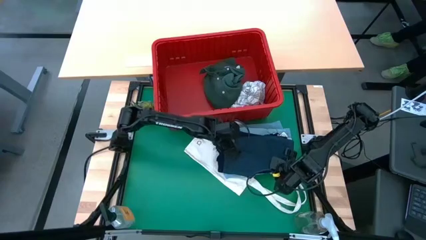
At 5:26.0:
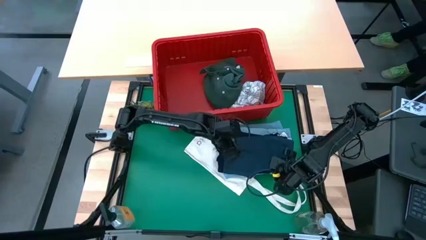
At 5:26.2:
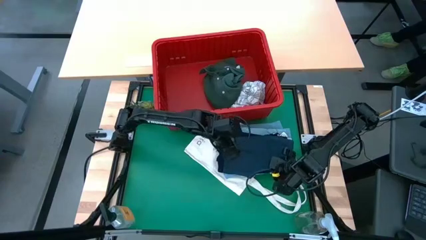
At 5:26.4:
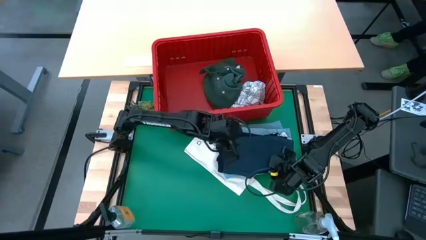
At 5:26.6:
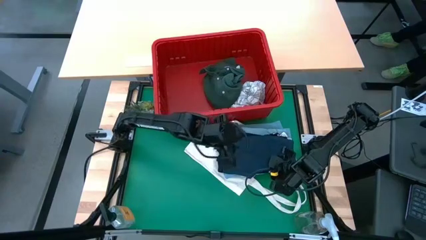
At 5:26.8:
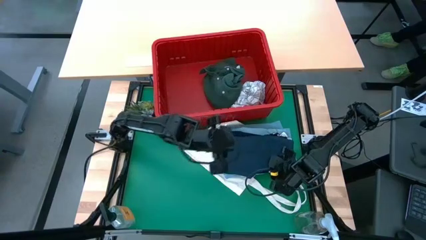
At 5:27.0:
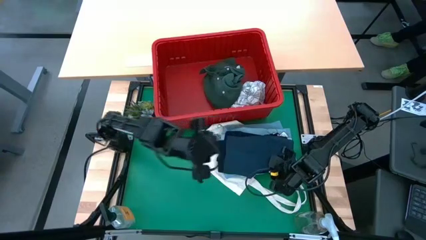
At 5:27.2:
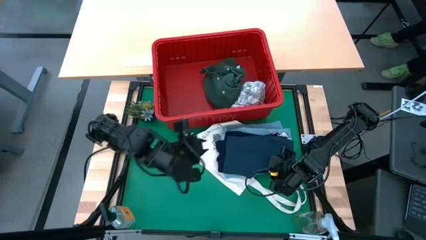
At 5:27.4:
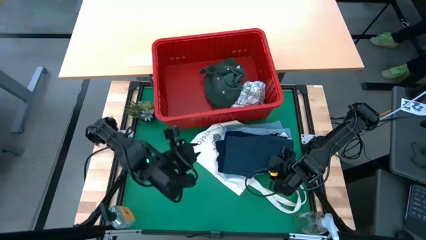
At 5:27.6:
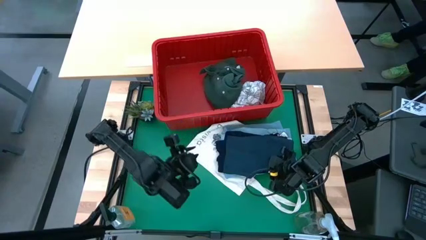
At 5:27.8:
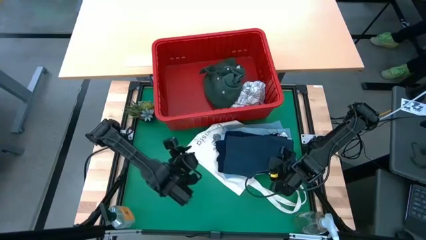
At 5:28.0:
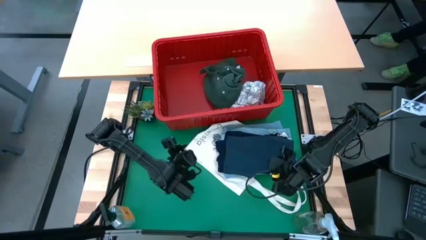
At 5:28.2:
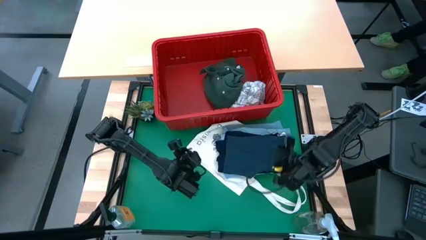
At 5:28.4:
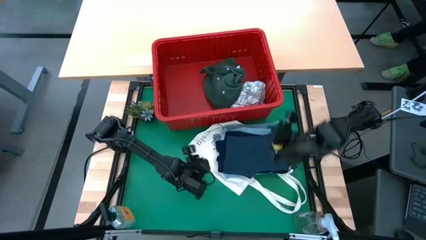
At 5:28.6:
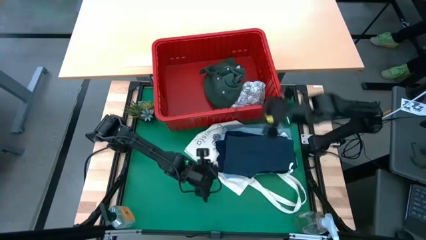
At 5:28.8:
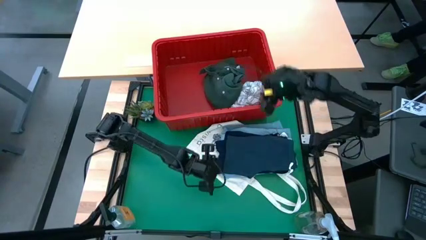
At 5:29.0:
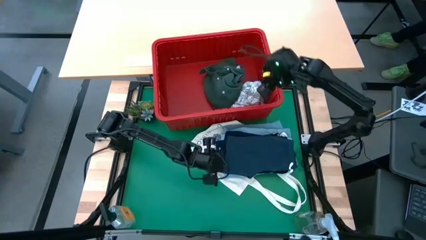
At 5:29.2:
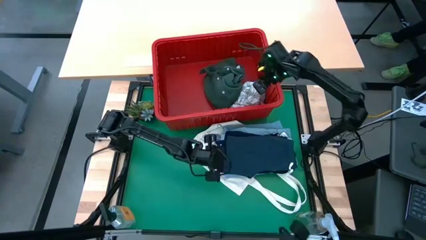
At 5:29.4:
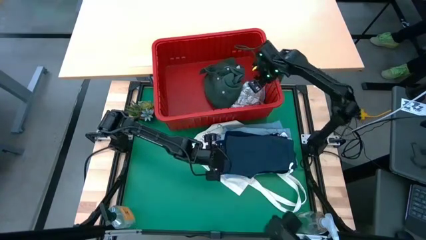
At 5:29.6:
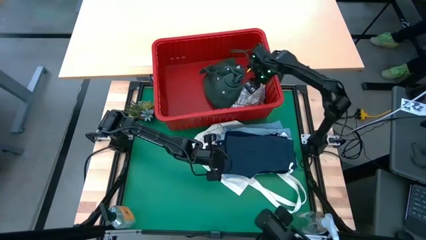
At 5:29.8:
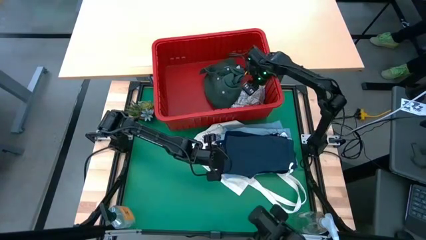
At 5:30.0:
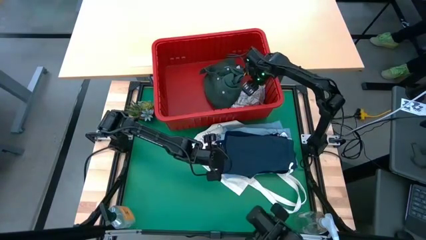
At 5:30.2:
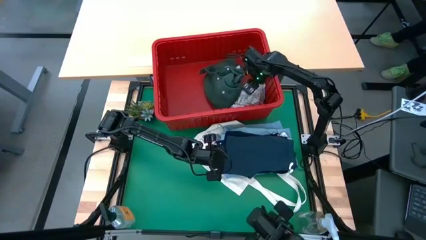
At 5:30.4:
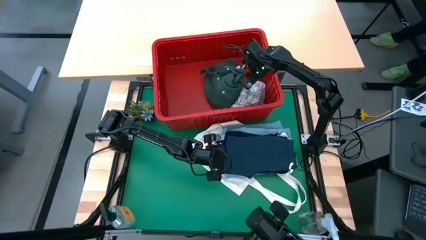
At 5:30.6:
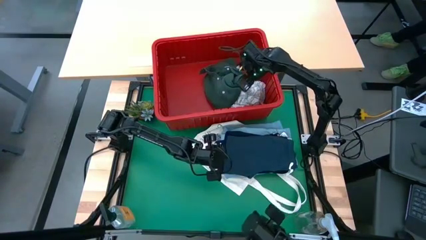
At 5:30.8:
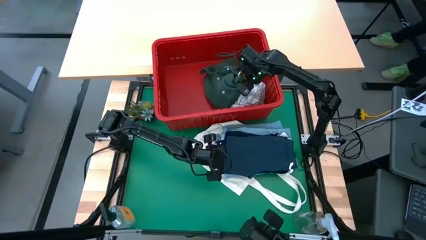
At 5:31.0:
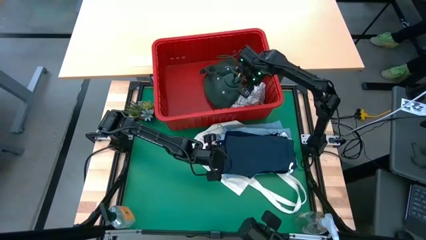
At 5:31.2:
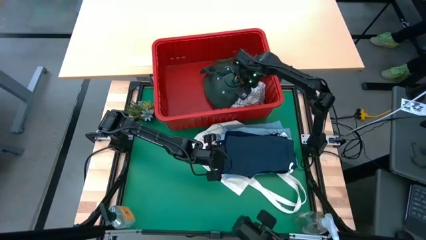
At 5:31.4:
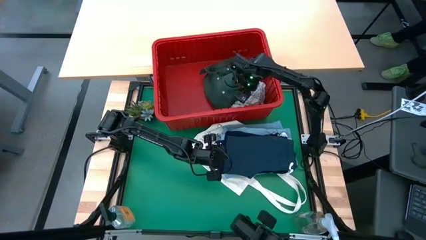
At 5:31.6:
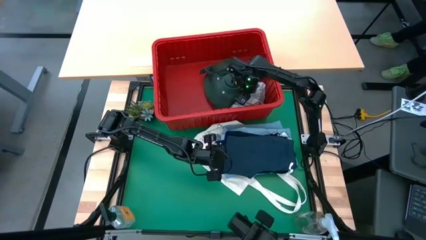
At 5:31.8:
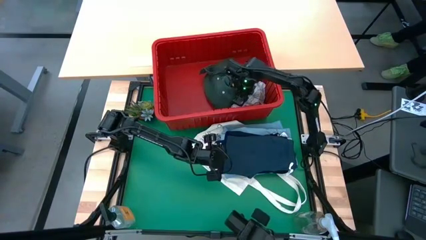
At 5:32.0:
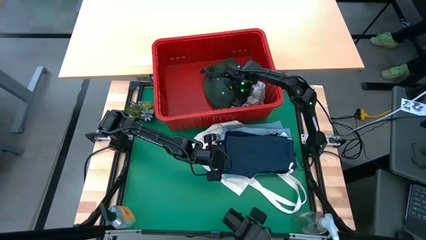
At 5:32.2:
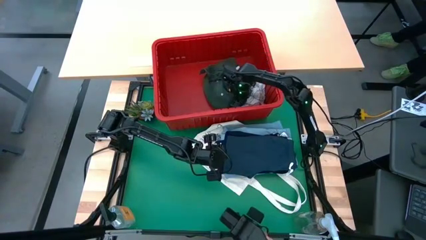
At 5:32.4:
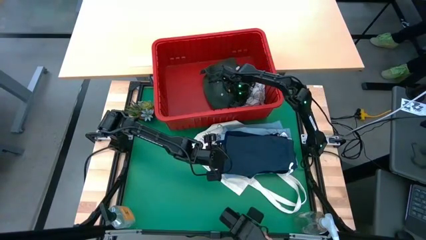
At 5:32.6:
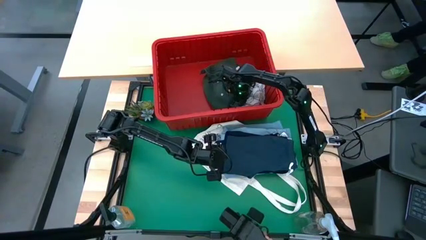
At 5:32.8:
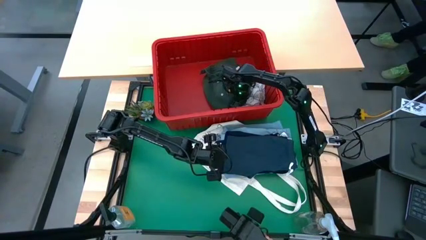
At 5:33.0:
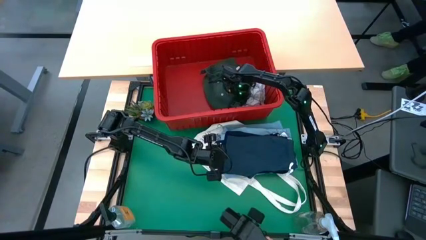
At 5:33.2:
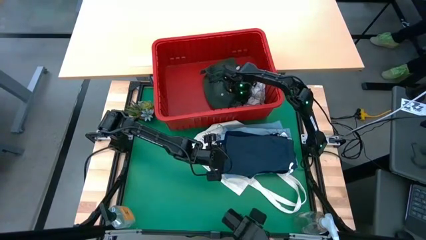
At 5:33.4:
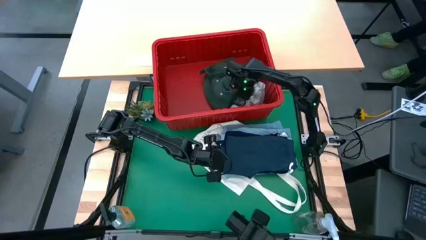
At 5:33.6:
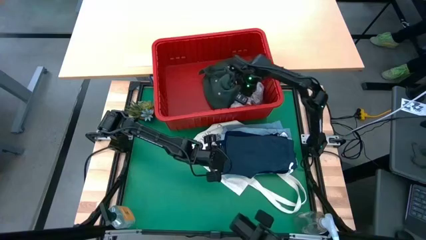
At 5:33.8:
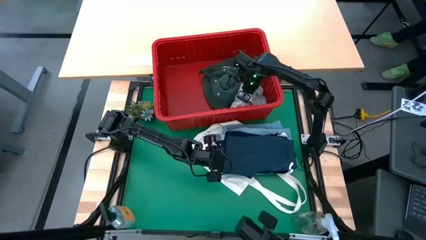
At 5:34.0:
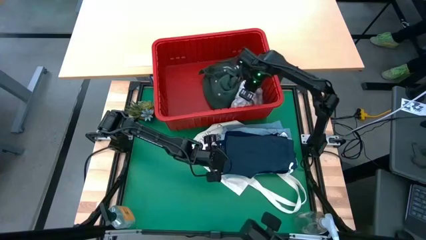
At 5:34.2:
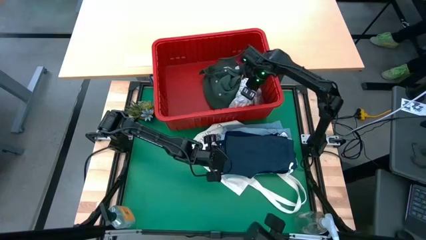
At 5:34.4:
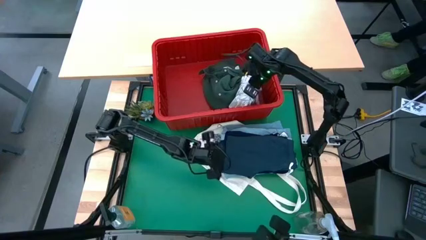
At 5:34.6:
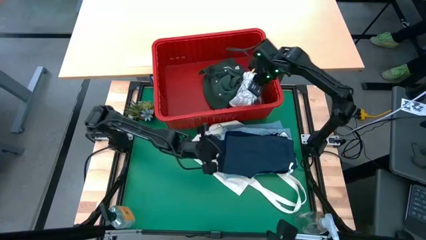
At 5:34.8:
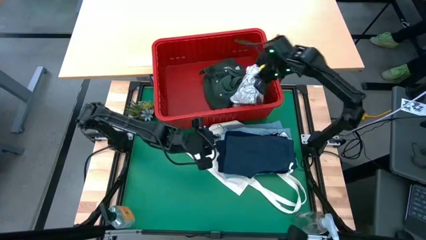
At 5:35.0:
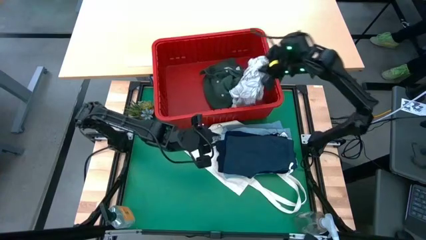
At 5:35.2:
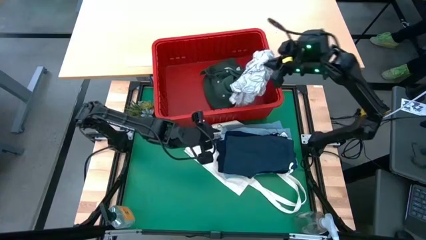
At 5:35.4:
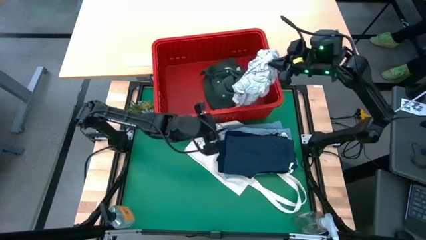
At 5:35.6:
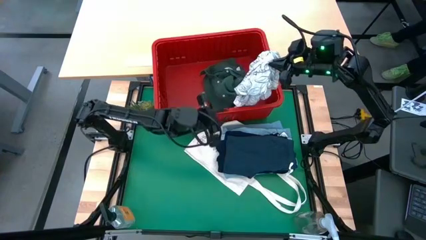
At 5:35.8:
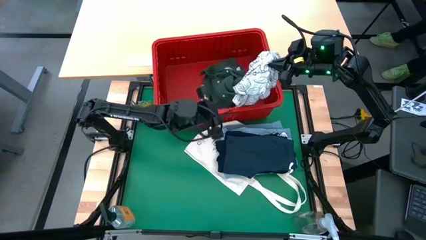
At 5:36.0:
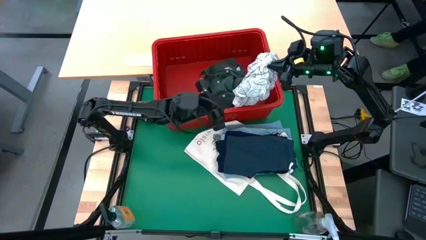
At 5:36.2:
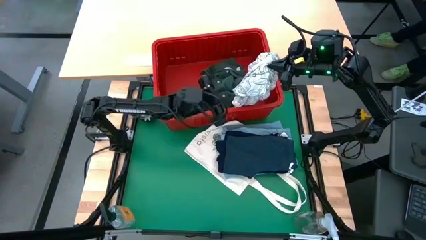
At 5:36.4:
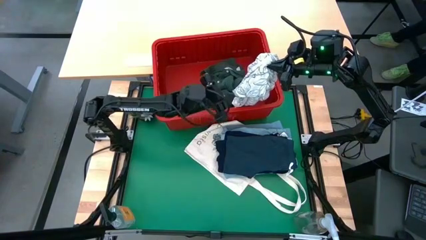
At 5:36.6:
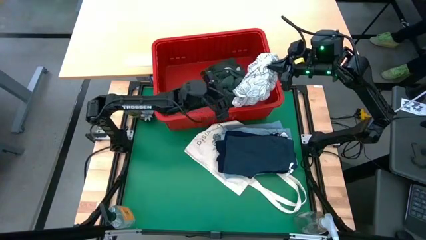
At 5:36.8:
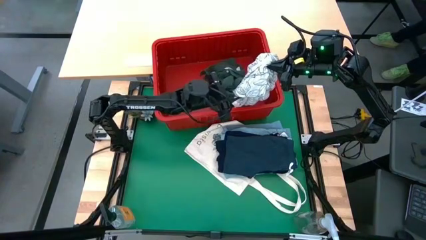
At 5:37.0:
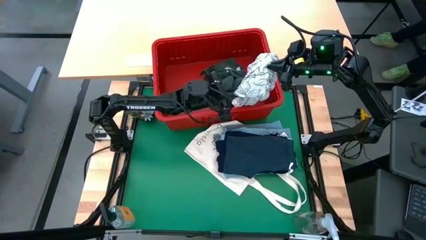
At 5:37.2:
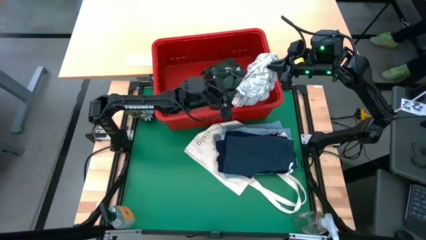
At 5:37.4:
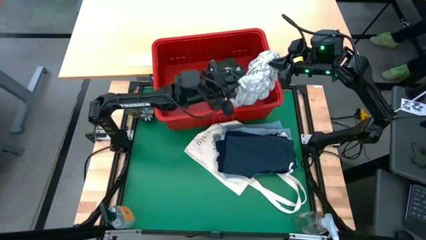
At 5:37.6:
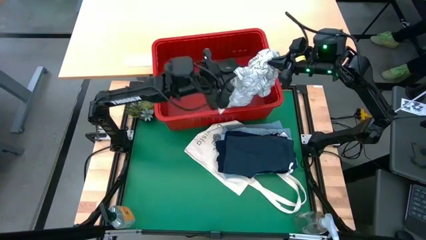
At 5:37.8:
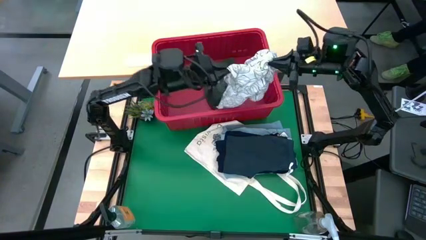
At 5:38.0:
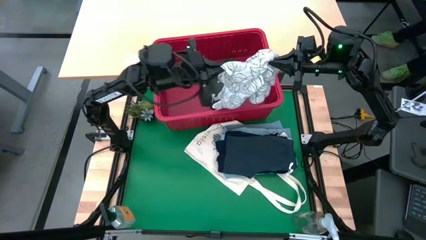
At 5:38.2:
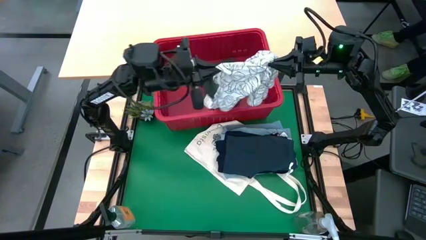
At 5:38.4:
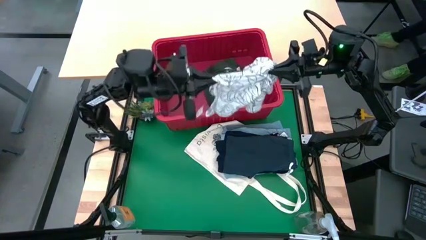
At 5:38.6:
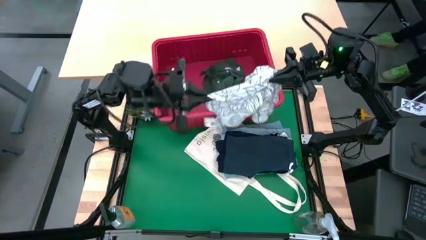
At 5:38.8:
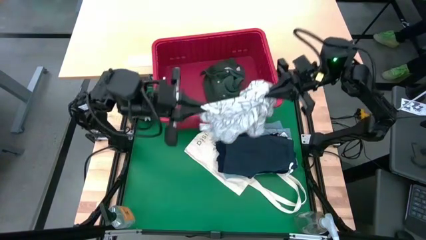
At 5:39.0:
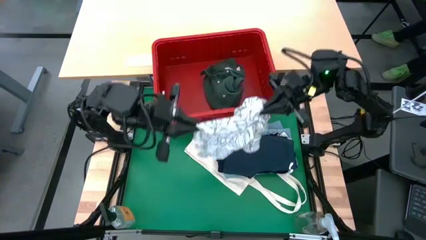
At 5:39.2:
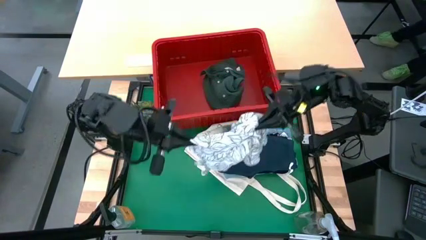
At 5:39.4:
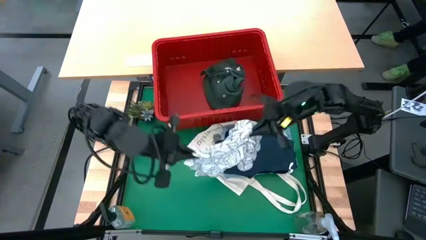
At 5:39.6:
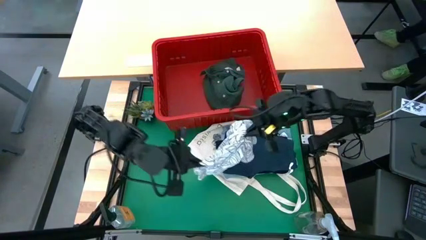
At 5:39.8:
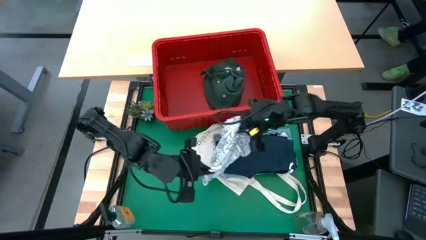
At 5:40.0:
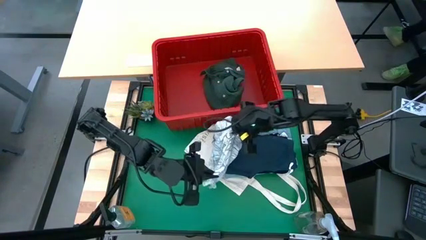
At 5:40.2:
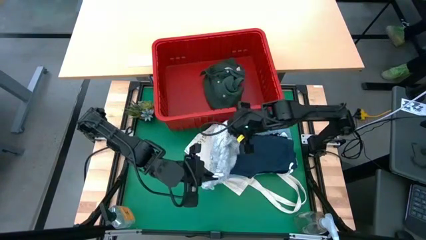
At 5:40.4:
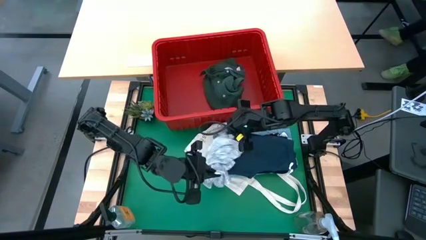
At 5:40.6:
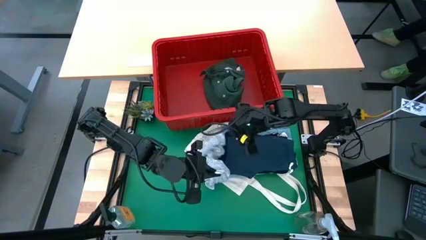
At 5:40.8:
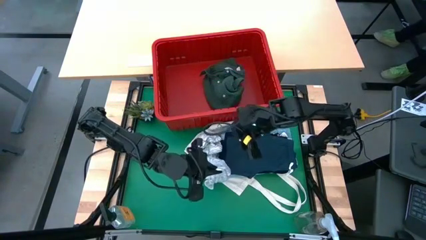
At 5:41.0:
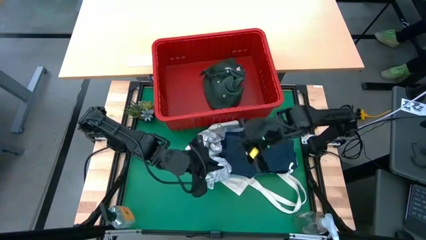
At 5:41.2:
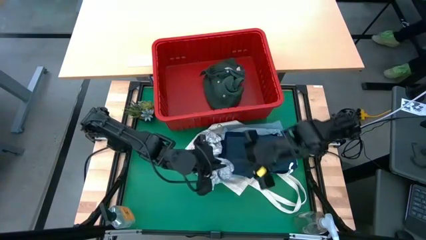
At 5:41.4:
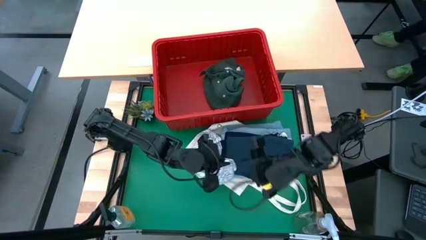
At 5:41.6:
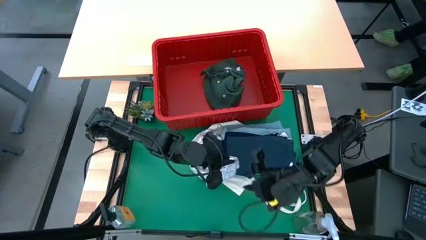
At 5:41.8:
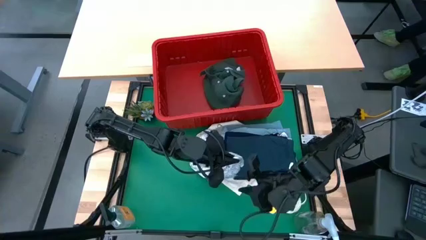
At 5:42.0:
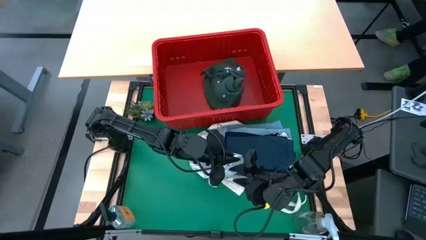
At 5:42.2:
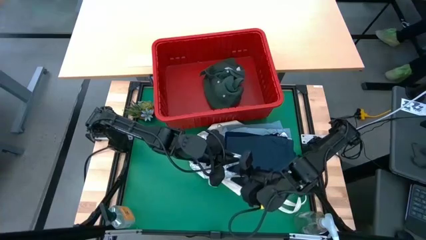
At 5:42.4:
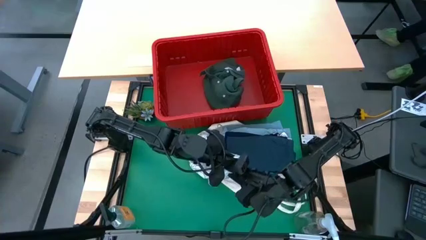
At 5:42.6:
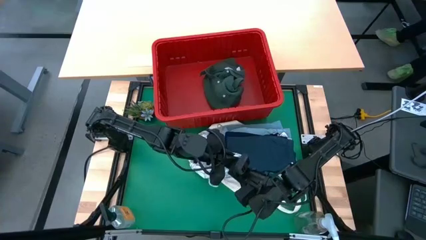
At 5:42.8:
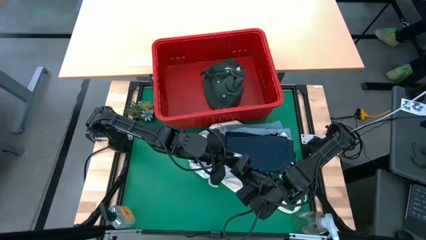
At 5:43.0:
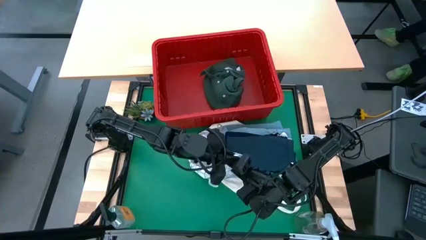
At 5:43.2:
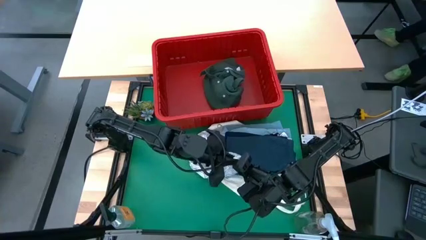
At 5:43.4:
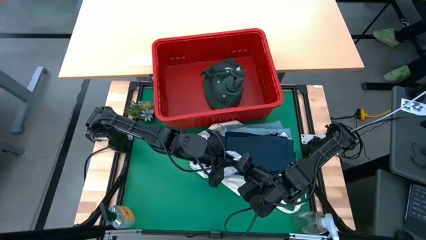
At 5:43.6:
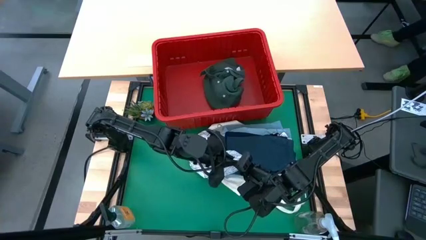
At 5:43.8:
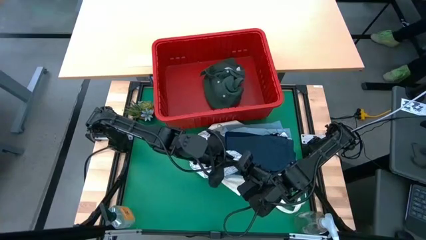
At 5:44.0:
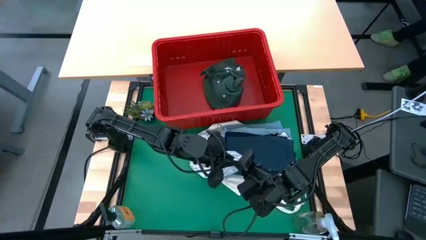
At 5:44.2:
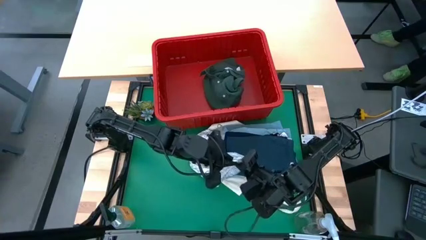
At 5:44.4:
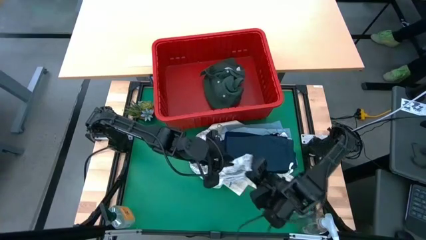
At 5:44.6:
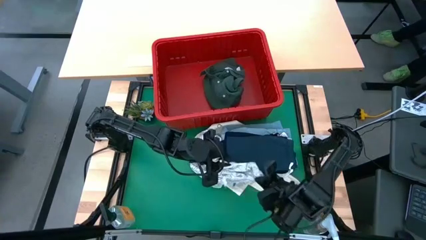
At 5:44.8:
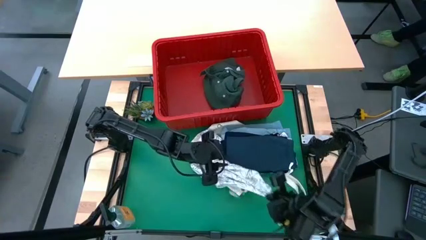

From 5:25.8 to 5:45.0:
Task: Fold laundry
Fold the patterned white shirt
